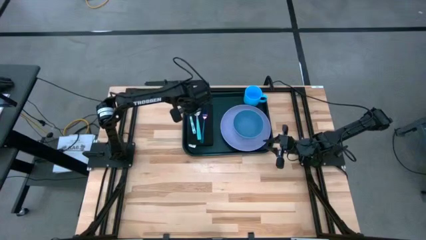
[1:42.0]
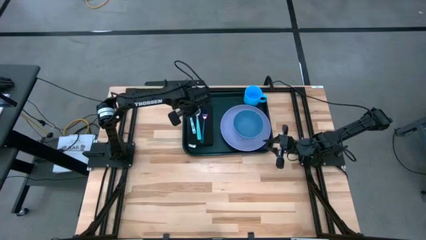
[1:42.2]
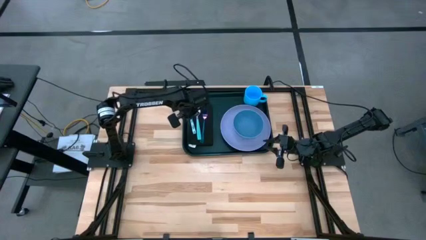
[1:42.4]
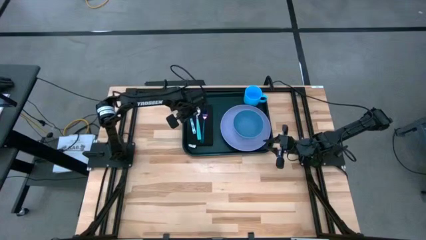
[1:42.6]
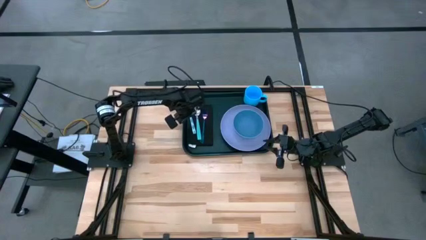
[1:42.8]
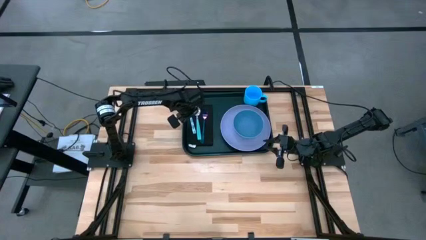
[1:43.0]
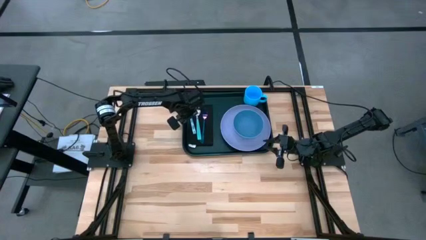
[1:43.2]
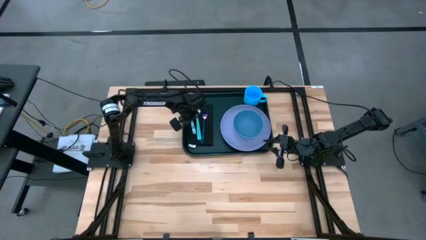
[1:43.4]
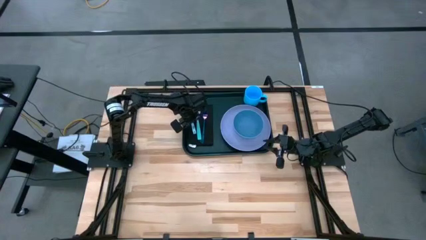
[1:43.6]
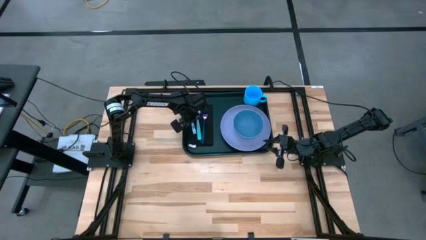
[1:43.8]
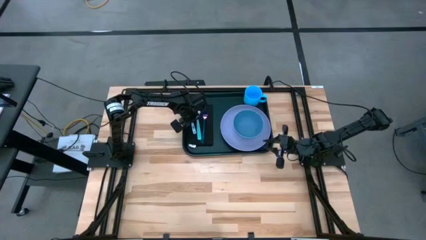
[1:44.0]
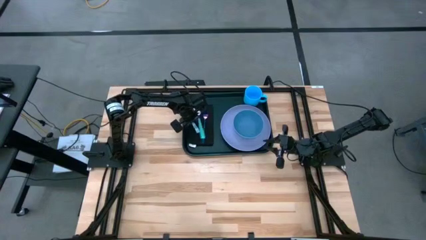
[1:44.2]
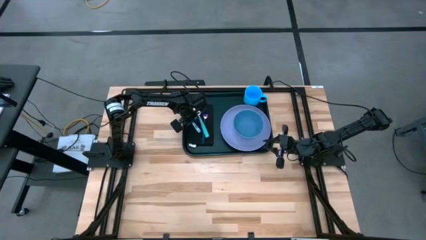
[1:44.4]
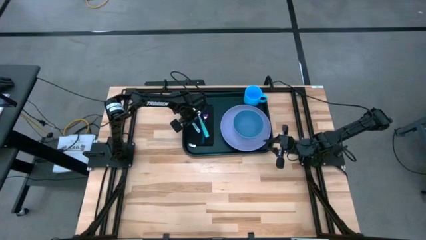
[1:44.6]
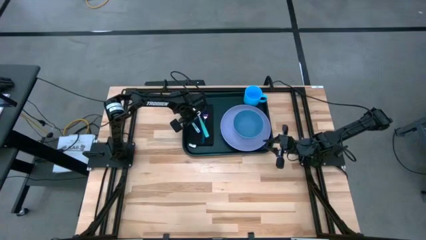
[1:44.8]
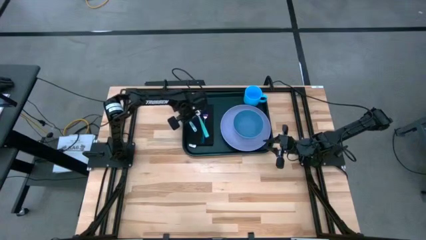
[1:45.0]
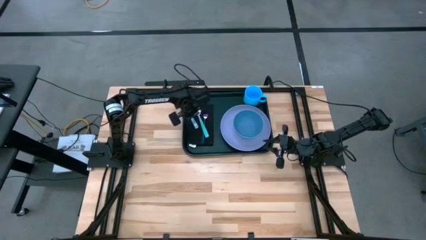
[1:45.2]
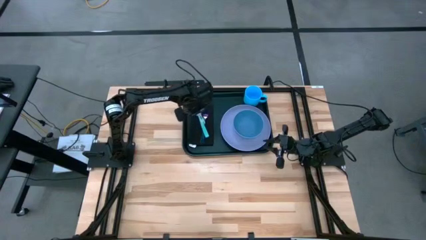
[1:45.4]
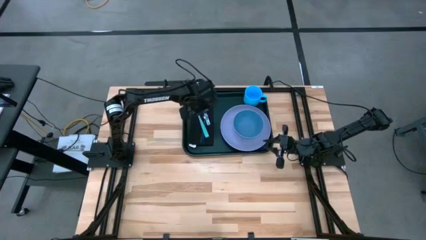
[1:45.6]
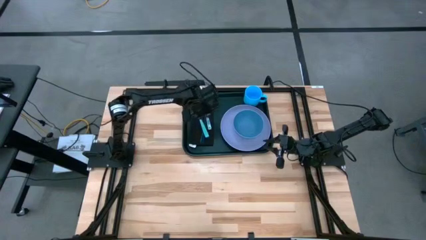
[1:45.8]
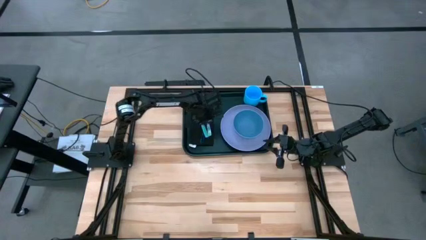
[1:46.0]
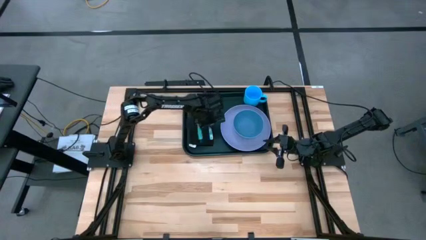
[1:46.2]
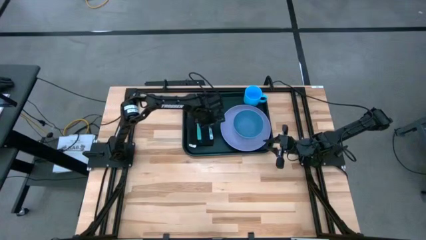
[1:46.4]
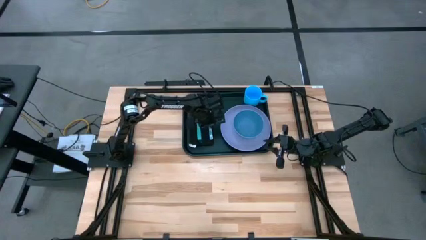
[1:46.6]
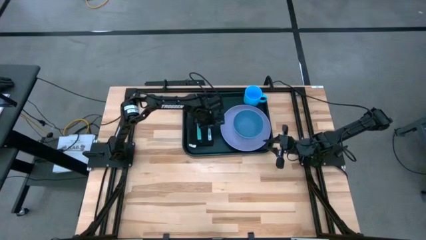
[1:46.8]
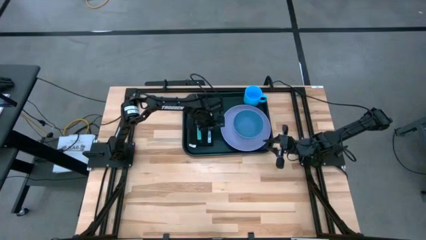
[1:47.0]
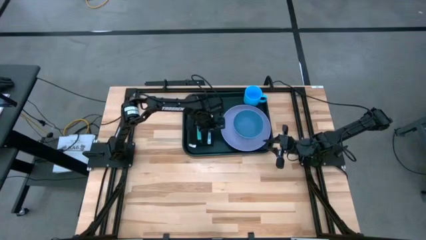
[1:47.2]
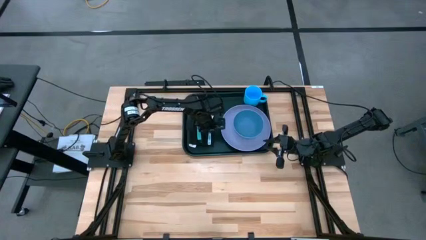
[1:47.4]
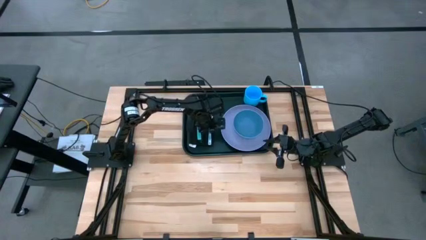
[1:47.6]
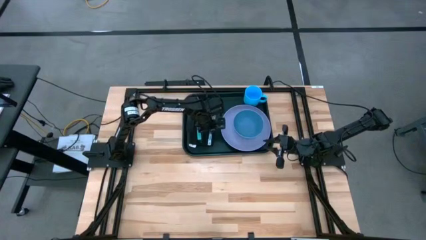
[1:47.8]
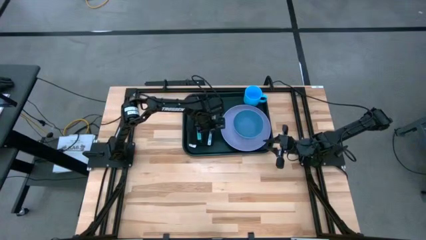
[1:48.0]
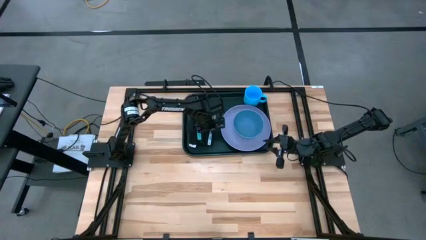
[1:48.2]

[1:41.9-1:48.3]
Task: Set up tray
Put the green knife on the black napkin

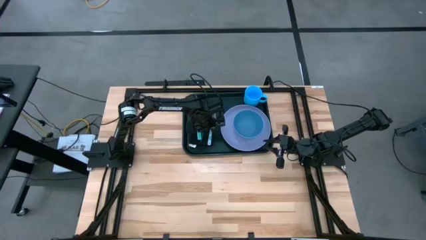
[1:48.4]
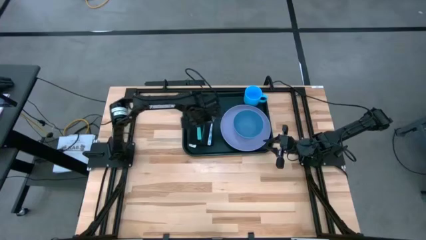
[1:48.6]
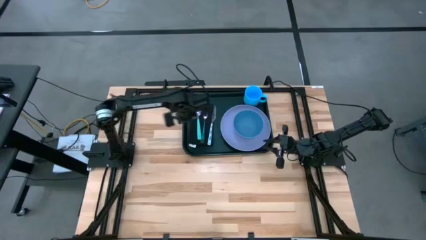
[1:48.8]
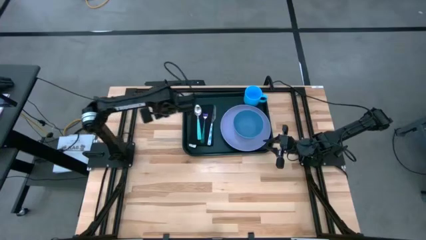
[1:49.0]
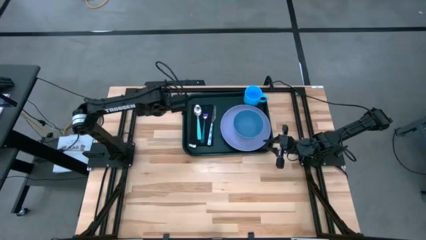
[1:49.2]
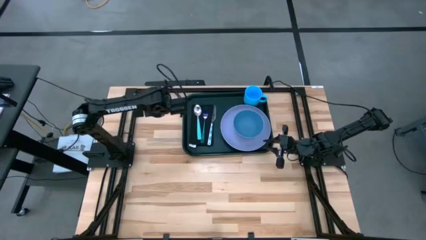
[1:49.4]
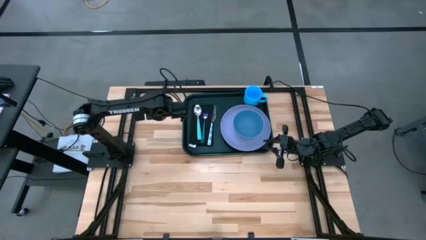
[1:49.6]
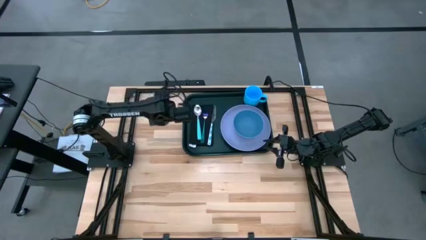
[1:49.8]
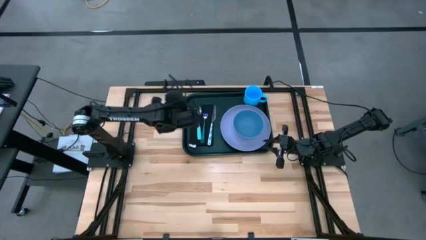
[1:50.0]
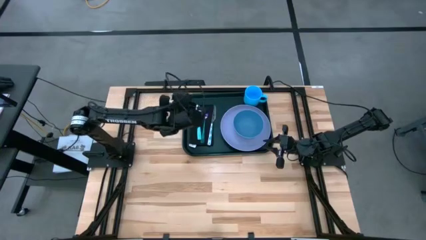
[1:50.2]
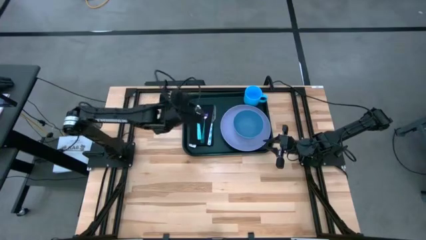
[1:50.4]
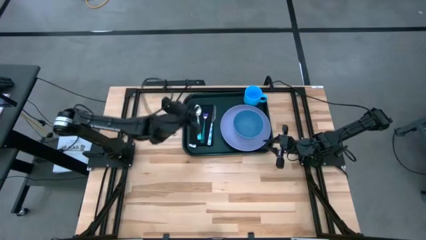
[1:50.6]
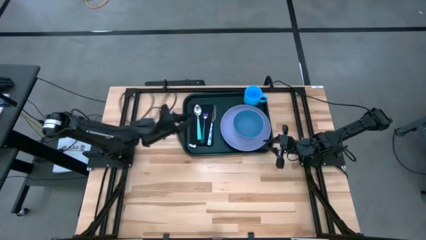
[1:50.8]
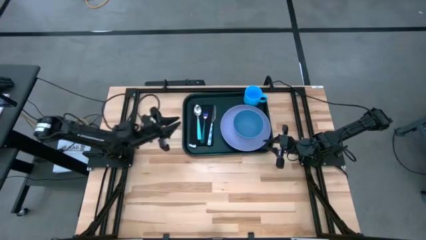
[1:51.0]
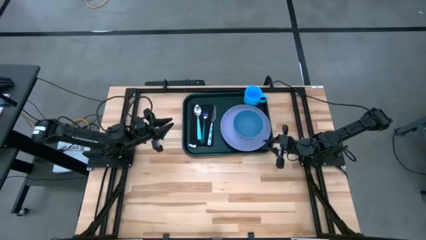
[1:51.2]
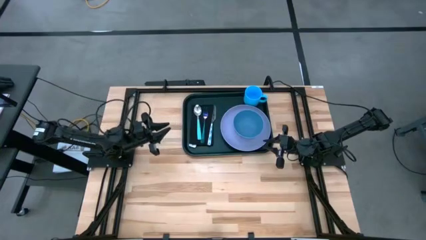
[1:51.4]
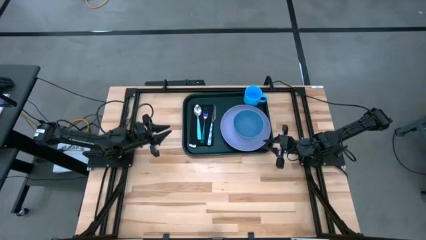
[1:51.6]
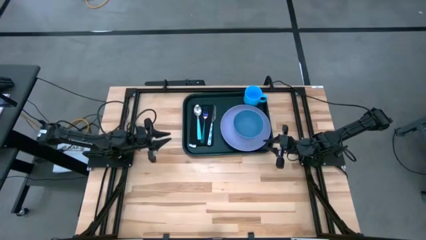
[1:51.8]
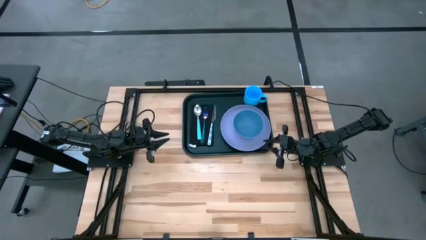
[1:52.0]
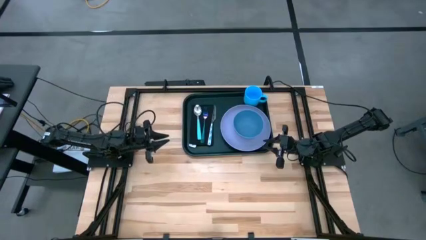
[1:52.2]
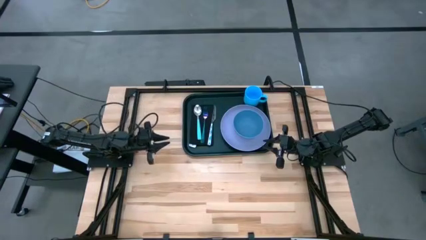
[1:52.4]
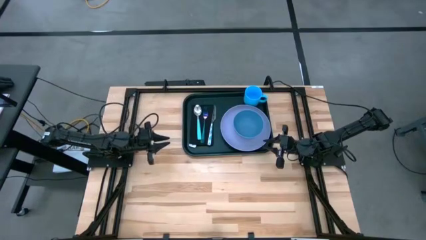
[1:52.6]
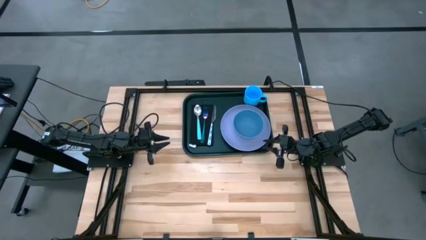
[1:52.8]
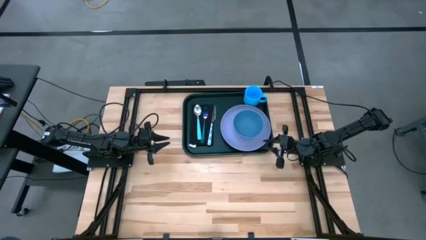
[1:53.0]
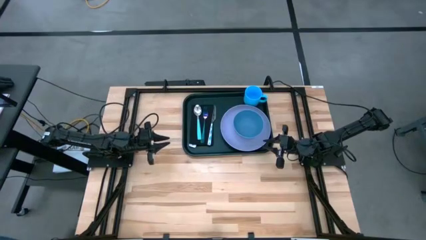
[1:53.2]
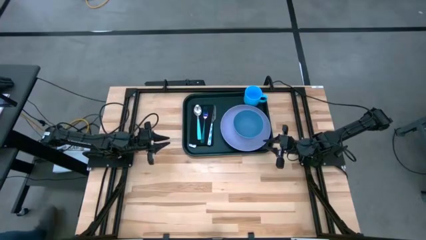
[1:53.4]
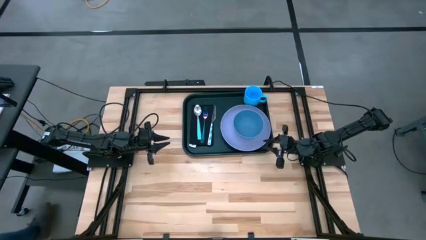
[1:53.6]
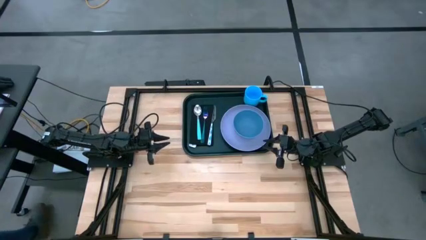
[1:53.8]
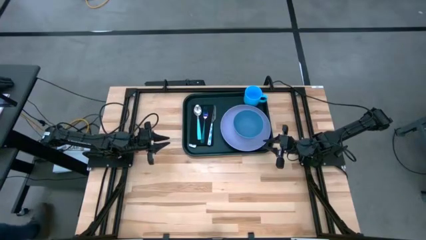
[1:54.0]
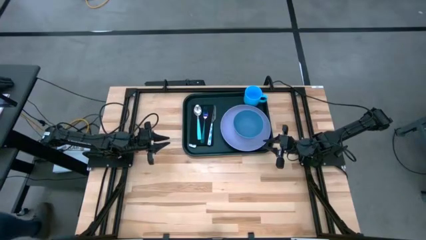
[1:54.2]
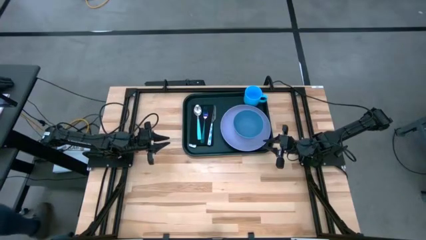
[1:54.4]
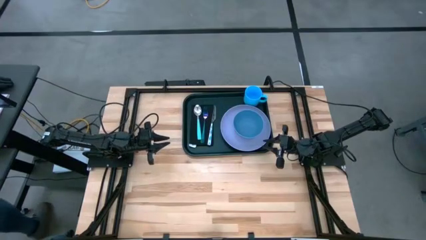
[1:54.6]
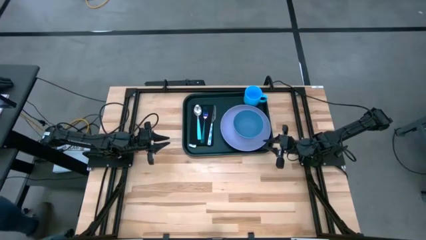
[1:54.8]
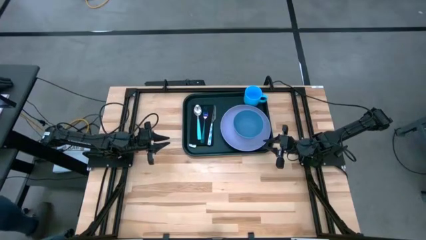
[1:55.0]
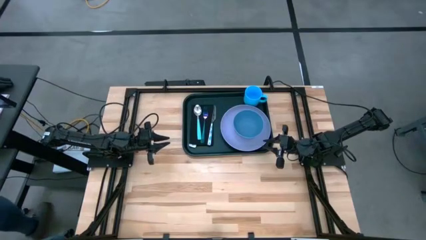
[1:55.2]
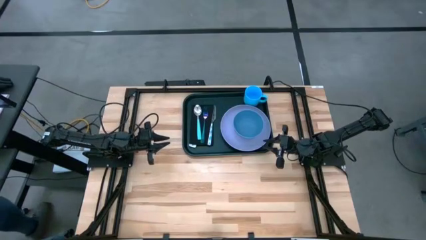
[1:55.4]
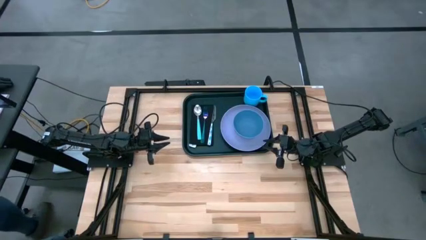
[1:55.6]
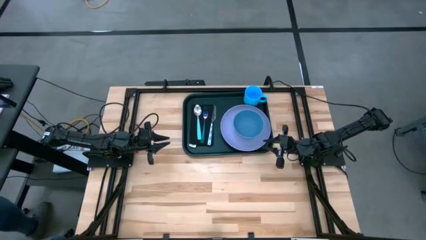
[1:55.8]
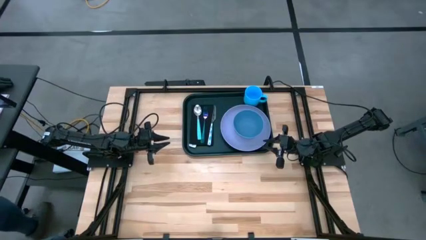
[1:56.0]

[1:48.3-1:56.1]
Return to Home Position

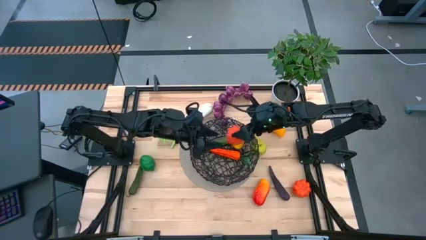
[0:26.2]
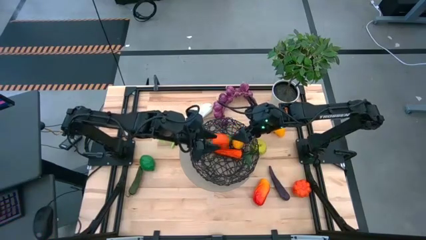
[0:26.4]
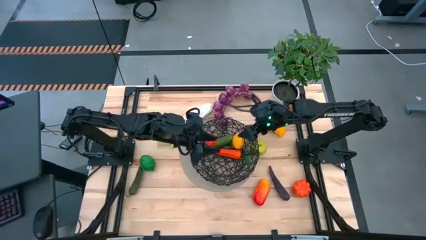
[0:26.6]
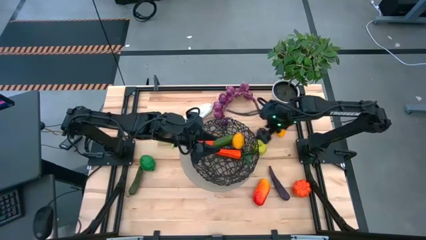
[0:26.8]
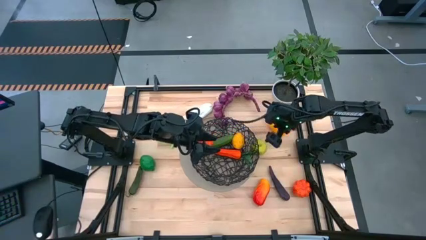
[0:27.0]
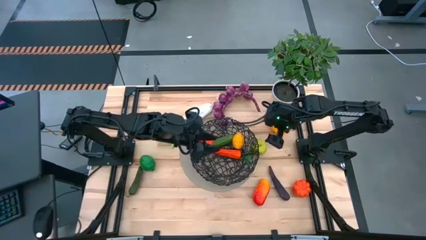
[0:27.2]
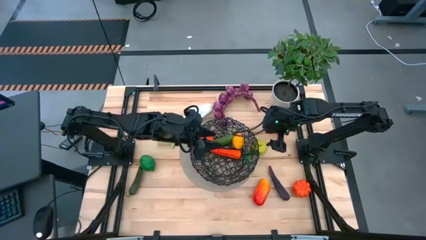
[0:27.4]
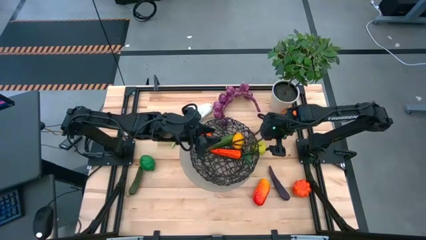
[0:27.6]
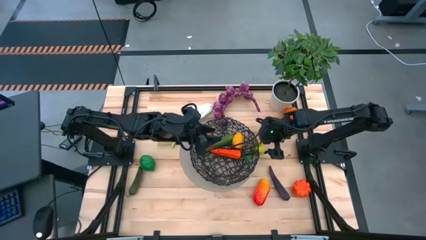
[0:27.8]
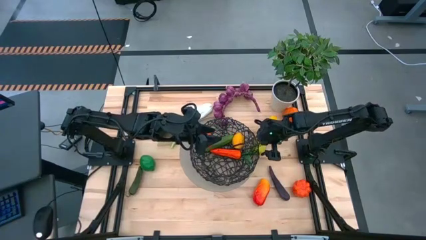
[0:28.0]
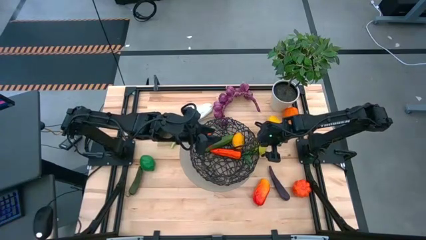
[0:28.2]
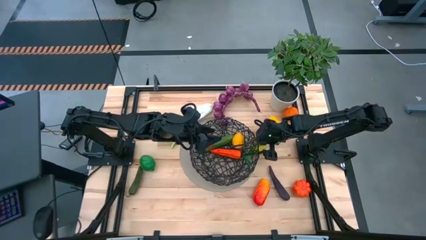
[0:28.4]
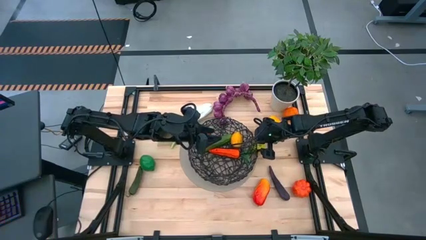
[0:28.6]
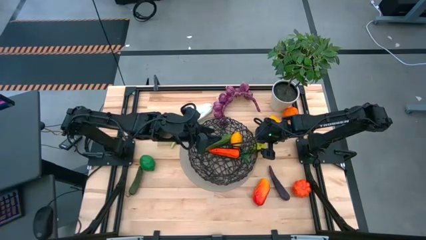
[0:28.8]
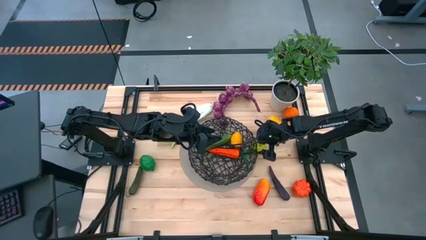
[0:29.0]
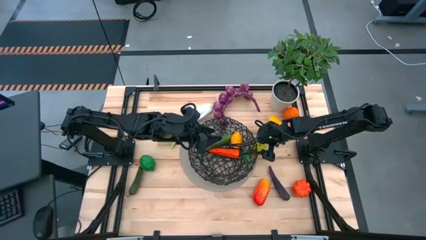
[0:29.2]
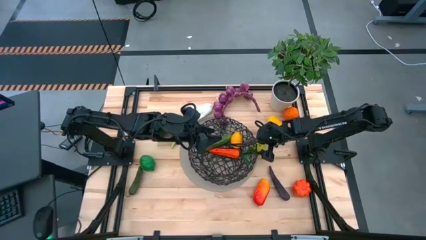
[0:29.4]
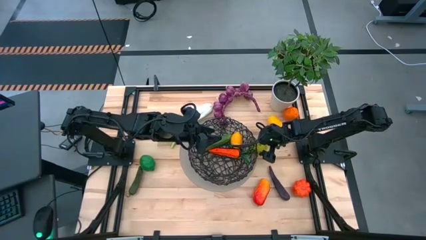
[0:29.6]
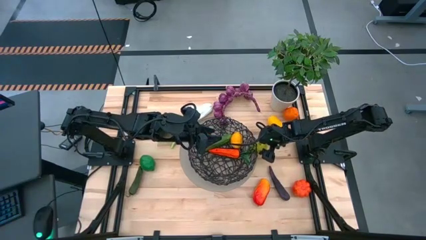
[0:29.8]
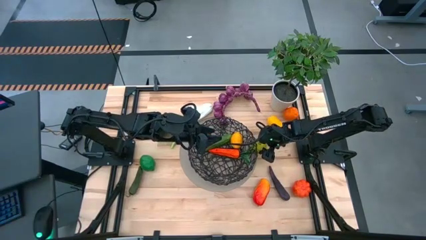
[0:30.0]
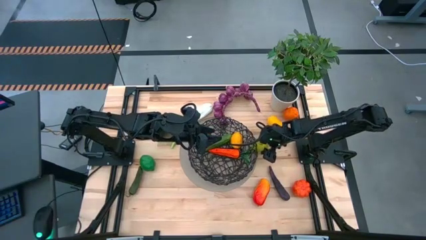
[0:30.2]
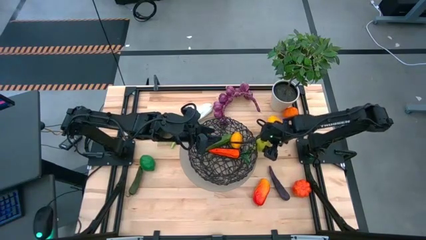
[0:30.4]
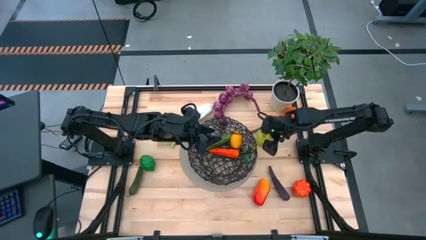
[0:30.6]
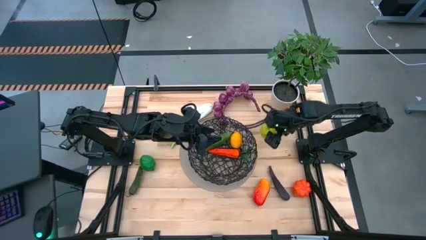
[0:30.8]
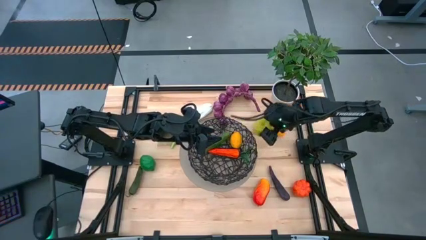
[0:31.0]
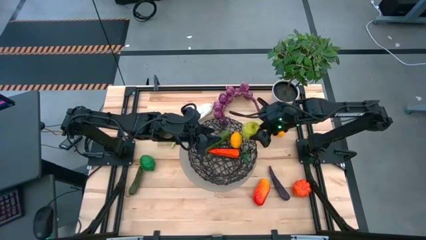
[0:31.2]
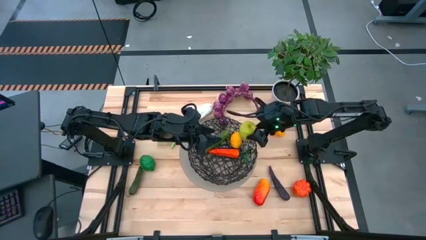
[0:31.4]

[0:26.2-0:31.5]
Task: Build produce basket
Put the green apple into the black wire basket
